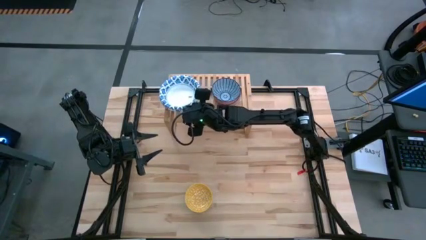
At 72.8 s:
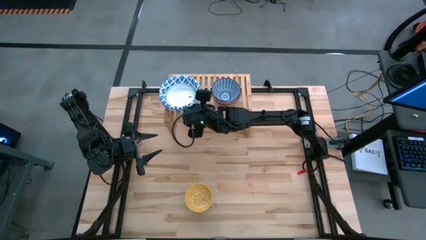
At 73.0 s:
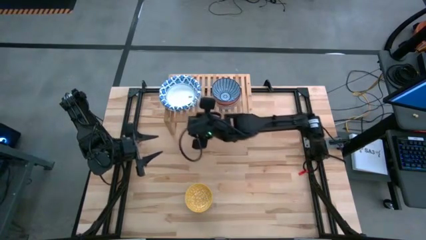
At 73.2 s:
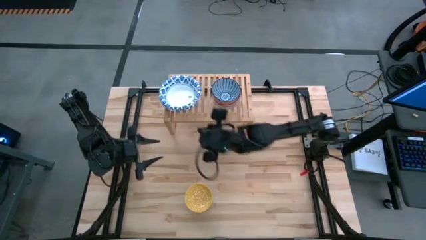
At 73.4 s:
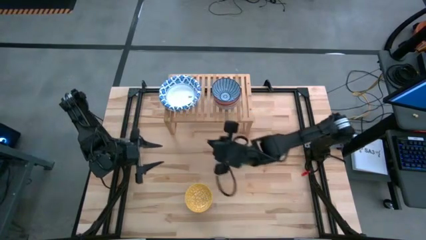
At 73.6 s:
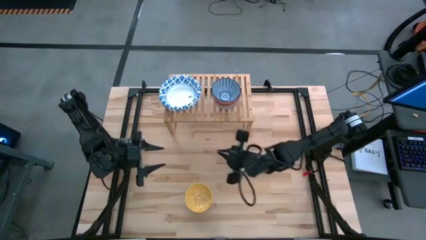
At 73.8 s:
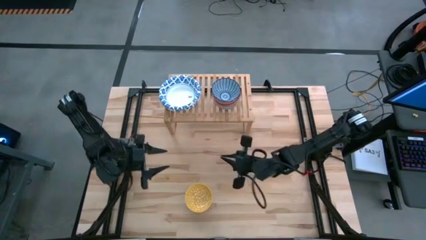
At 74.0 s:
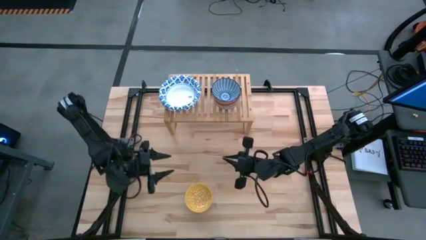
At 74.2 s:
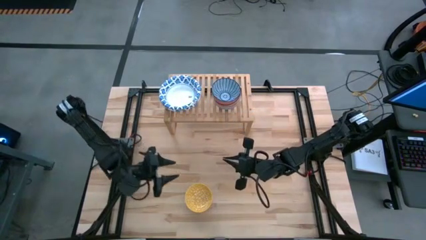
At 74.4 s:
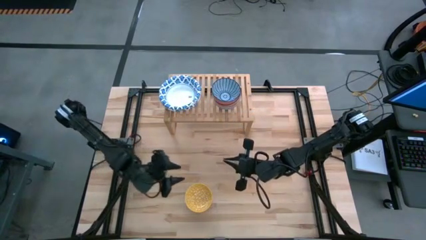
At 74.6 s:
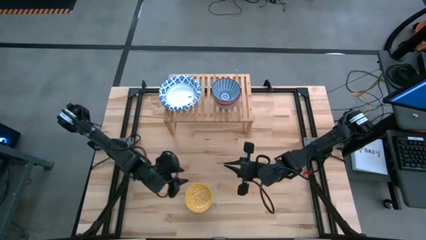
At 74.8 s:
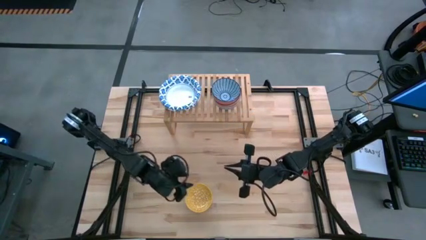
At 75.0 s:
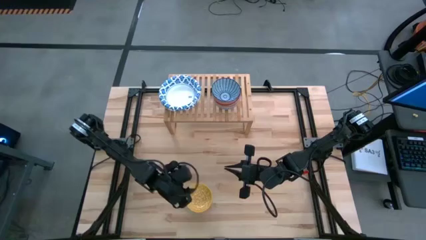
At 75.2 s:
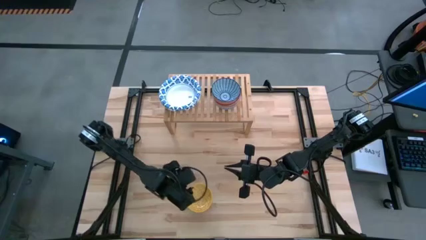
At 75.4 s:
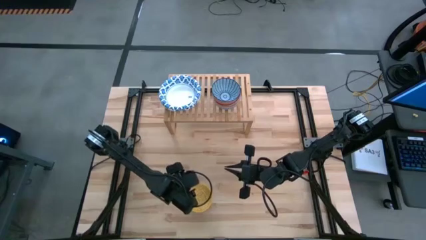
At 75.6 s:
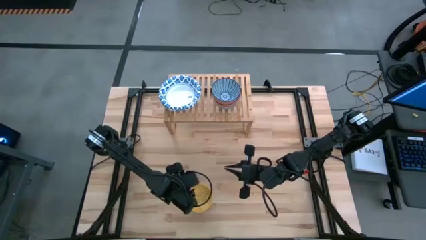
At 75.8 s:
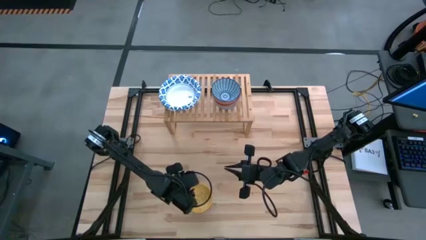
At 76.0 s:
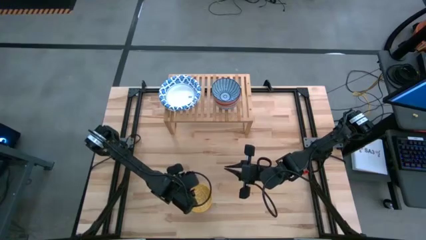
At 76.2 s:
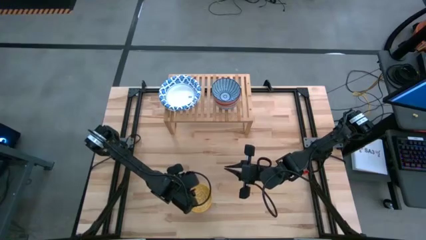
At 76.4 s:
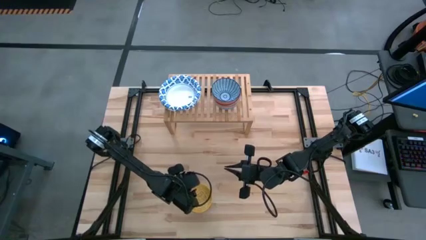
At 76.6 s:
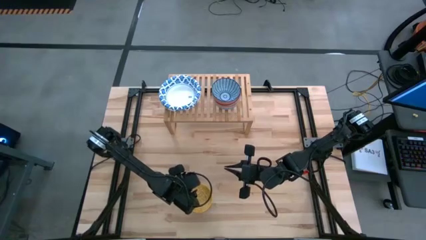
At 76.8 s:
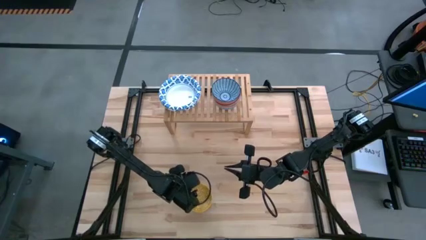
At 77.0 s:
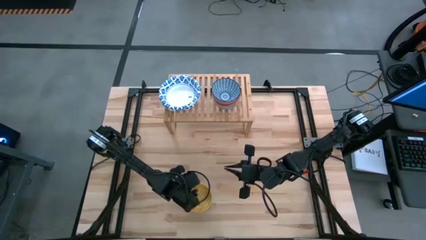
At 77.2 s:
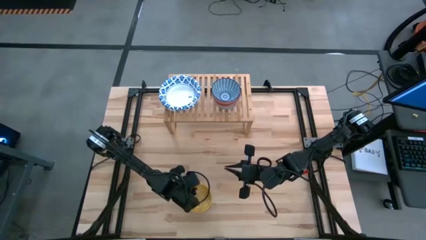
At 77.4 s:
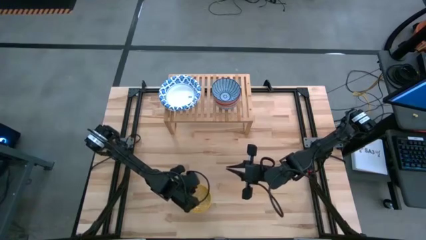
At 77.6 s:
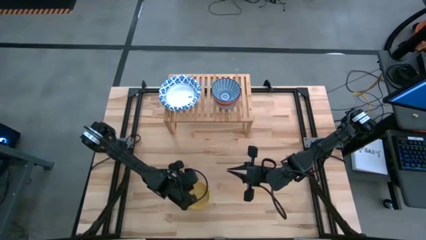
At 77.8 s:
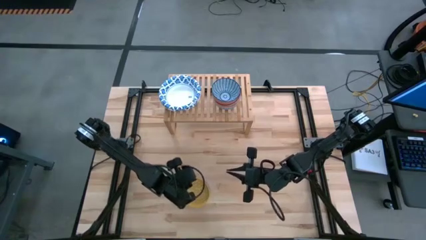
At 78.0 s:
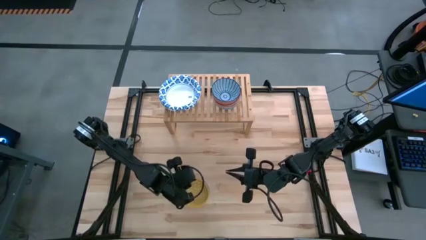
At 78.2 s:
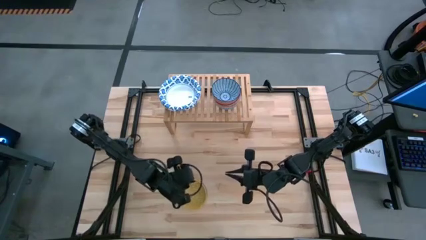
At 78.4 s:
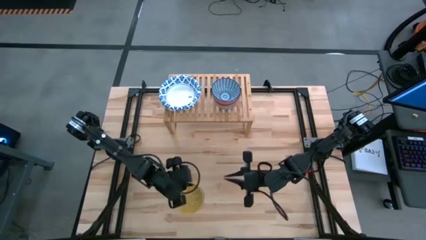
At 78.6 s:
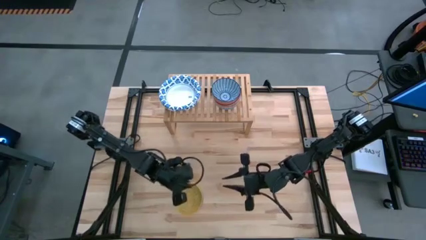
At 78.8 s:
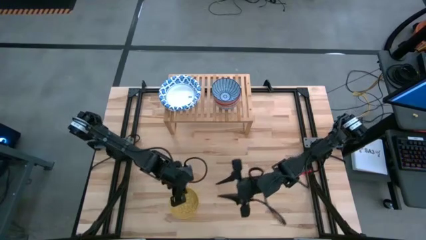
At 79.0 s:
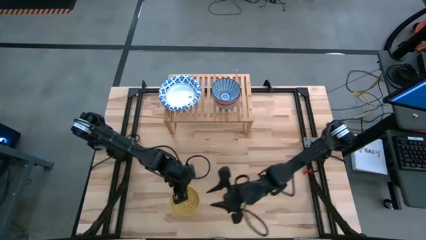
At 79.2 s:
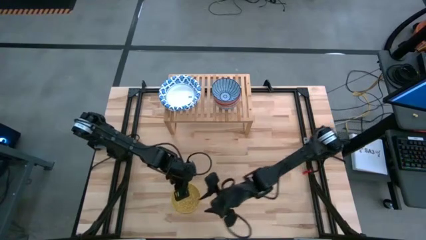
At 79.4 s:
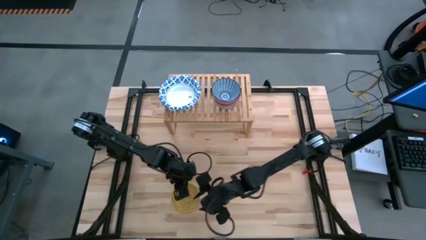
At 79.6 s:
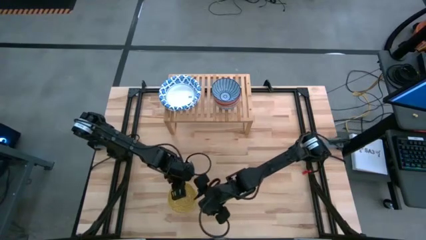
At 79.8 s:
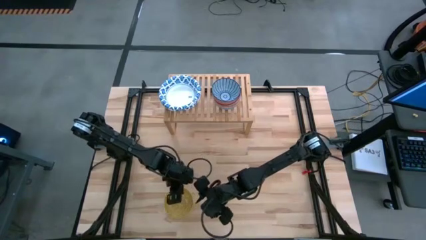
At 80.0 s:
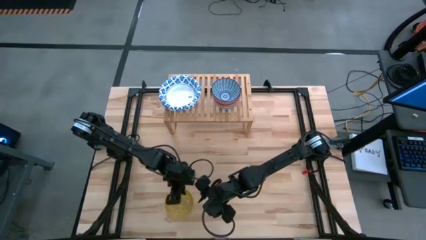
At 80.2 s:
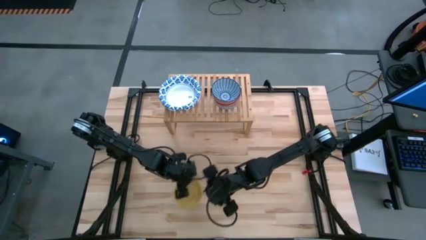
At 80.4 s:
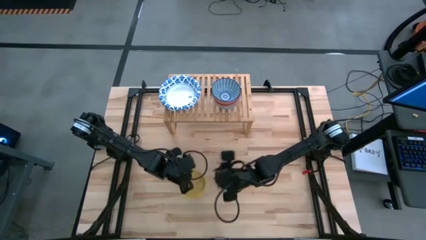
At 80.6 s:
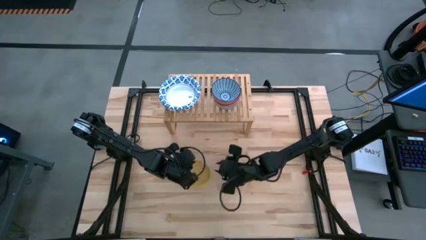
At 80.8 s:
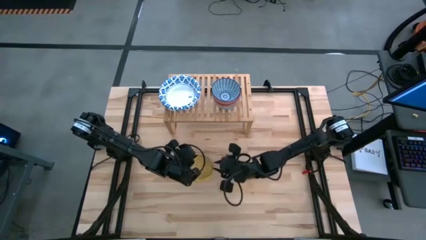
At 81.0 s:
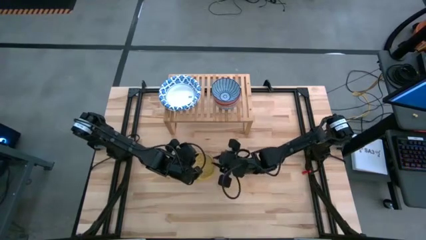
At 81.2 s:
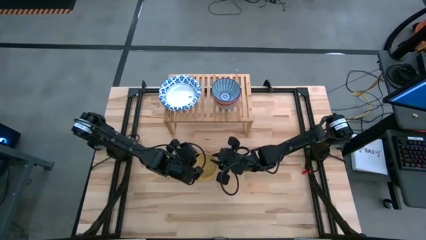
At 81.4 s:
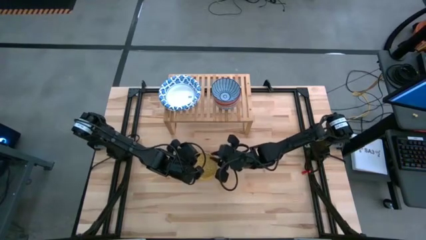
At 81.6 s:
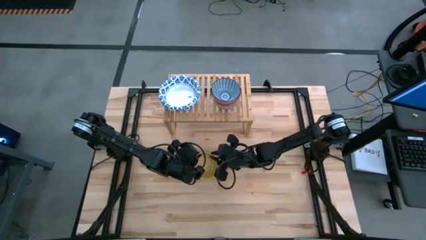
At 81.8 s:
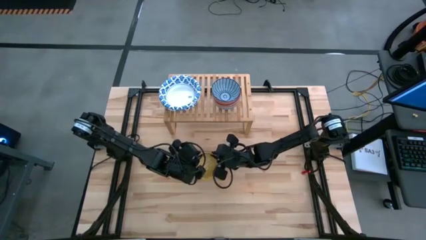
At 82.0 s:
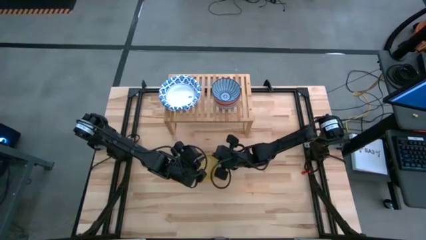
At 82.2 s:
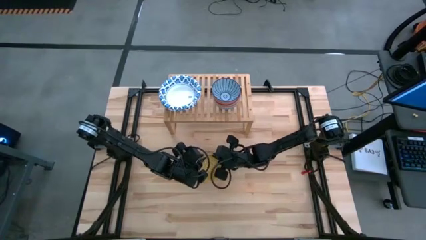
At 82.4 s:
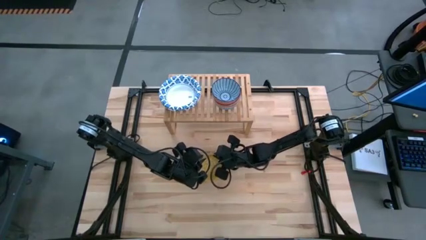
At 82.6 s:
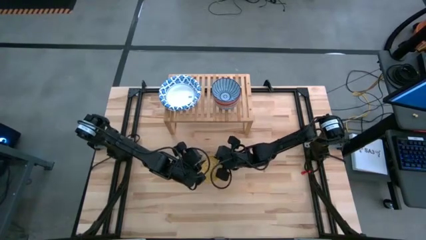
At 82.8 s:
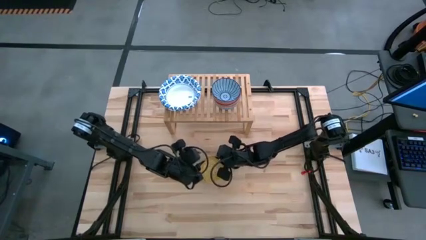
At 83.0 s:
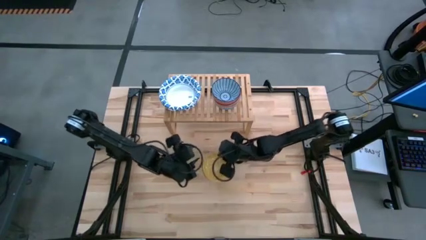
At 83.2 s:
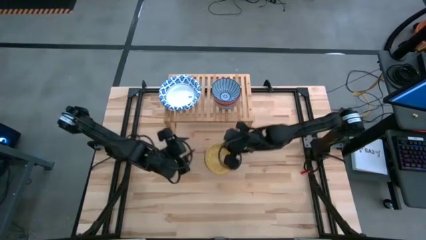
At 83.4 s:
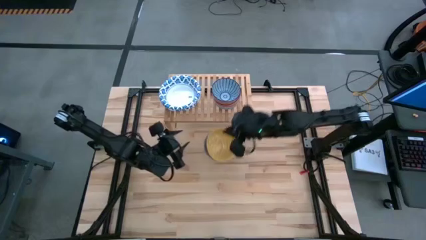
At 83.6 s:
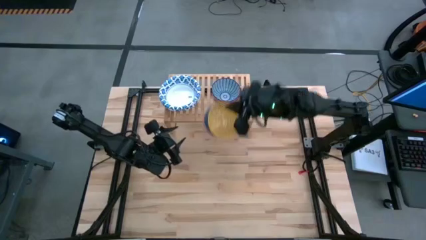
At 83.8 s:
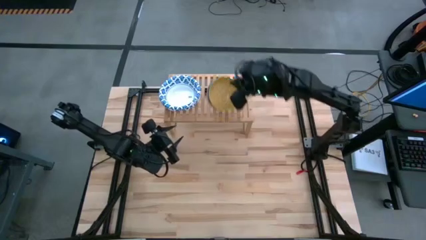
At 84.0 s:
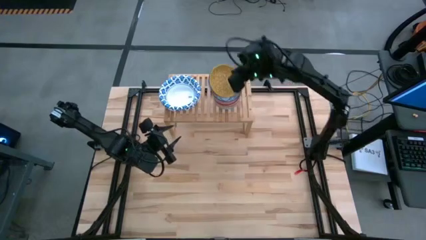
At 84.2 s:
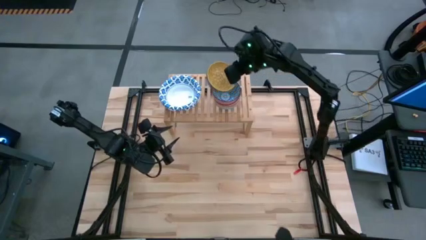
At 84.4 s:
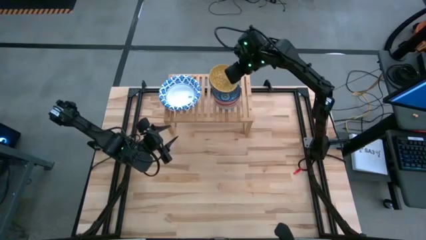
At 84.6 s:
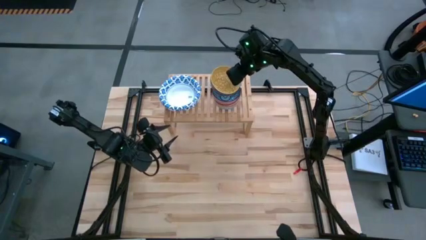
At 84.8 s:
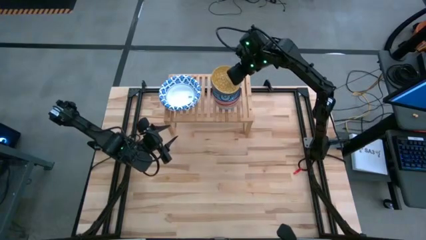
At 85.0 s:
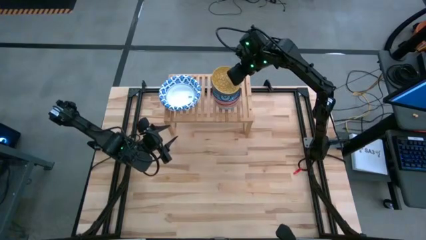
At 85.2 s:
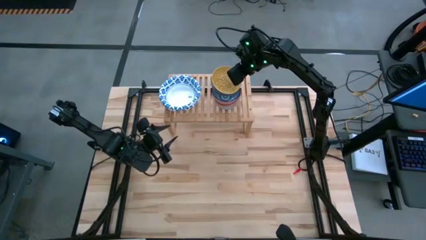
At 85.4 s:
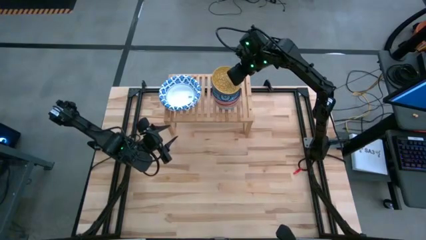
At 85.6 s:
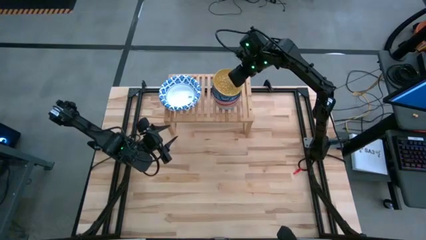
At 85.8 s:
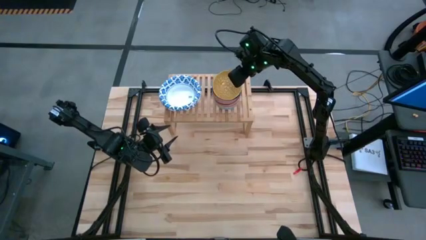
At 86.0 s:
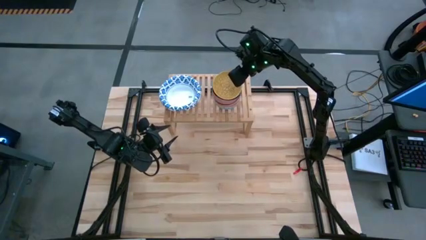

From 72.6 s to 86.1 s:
Task: Place and stack bowls onto a shelf
Stack the yellow patterned bowl on top of the blue patterned bowl on the shelf
